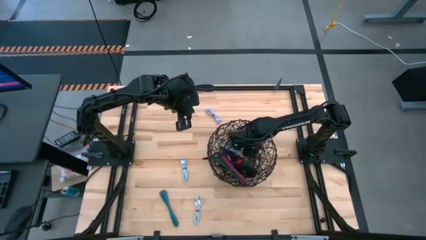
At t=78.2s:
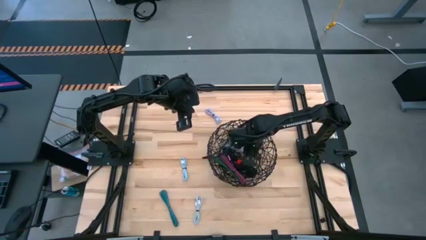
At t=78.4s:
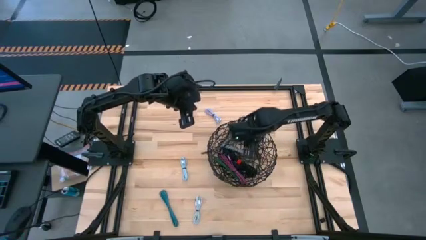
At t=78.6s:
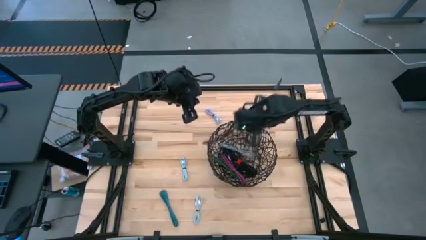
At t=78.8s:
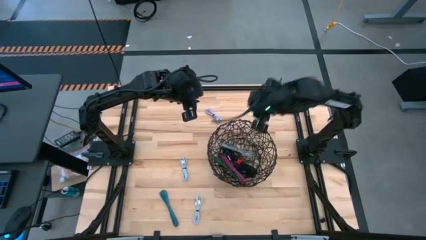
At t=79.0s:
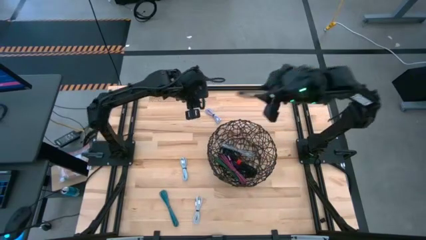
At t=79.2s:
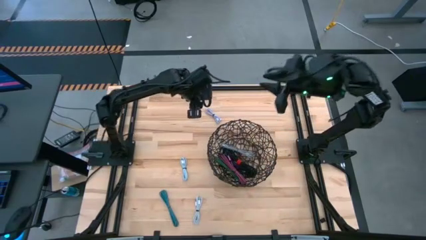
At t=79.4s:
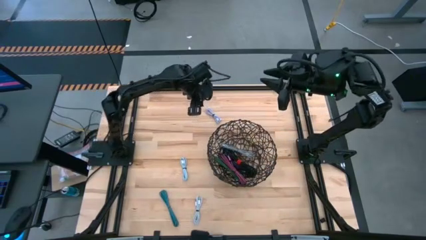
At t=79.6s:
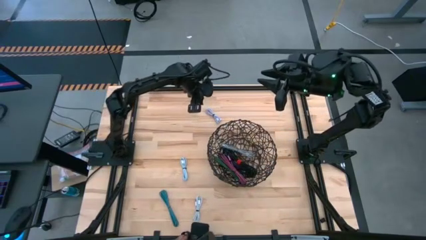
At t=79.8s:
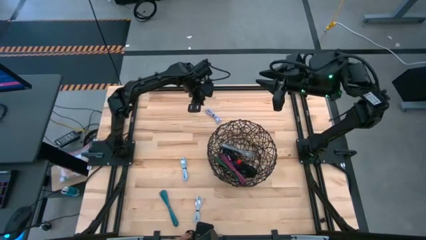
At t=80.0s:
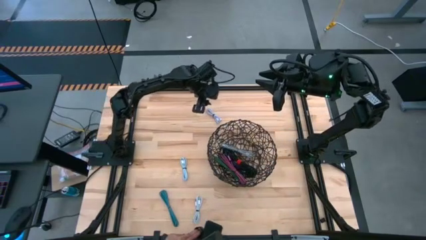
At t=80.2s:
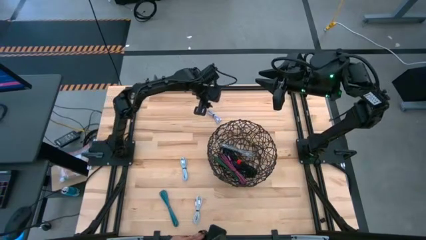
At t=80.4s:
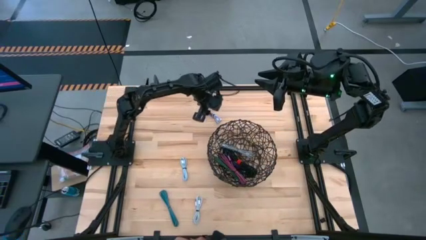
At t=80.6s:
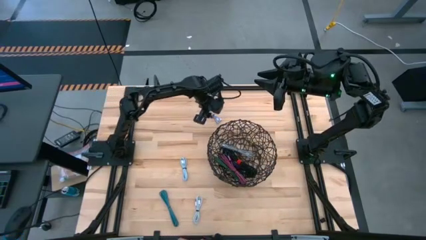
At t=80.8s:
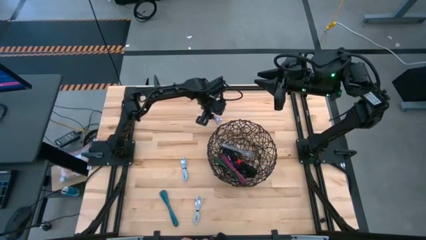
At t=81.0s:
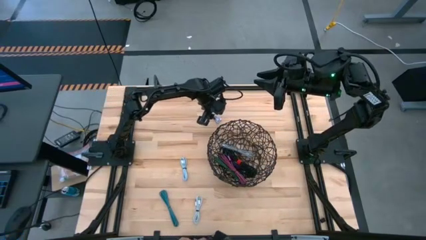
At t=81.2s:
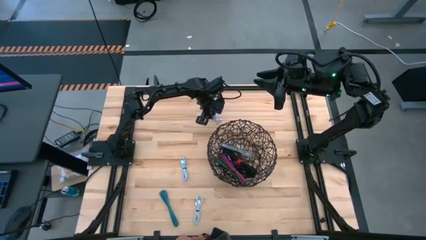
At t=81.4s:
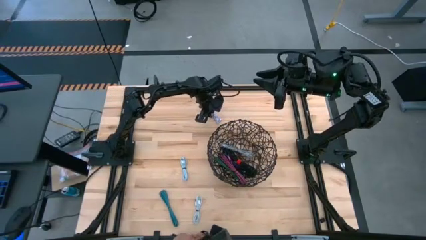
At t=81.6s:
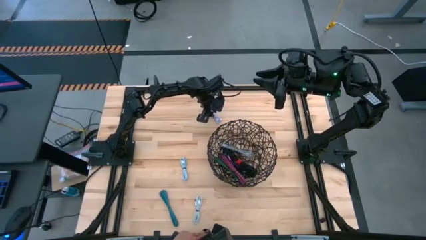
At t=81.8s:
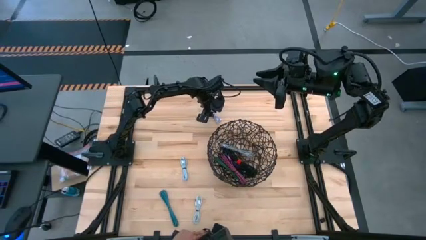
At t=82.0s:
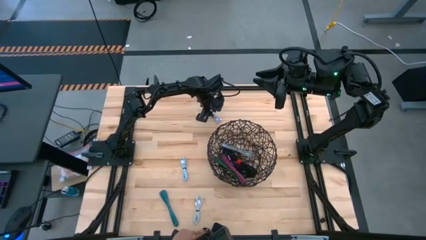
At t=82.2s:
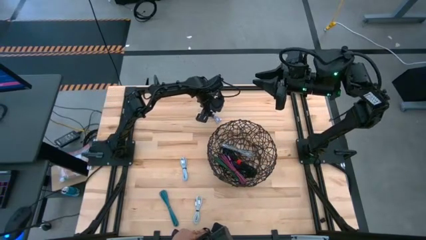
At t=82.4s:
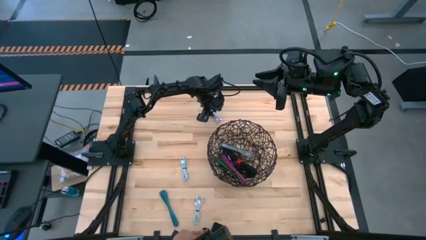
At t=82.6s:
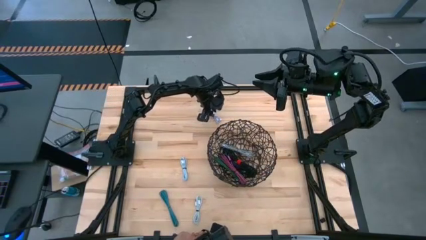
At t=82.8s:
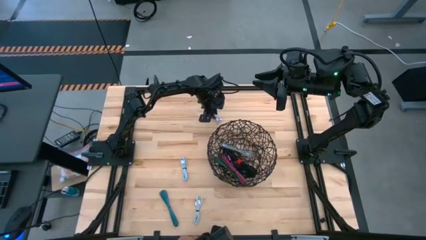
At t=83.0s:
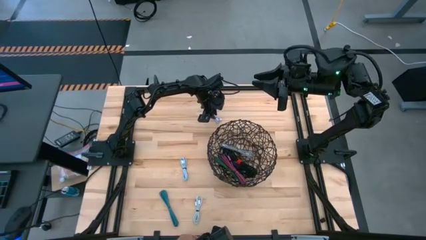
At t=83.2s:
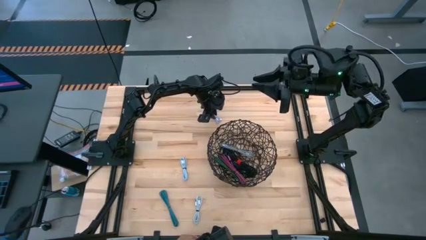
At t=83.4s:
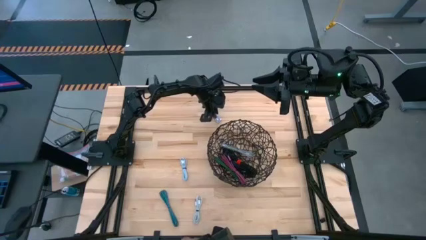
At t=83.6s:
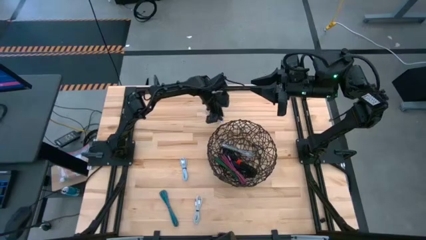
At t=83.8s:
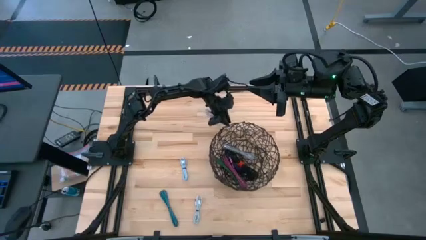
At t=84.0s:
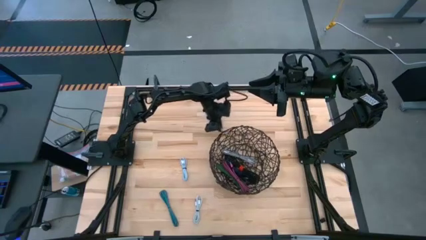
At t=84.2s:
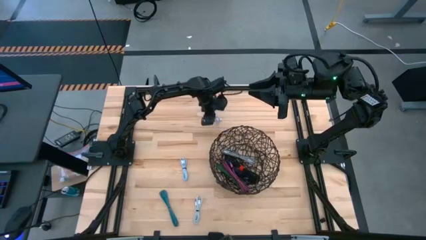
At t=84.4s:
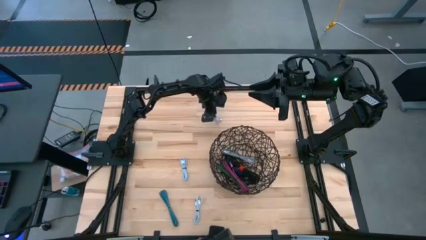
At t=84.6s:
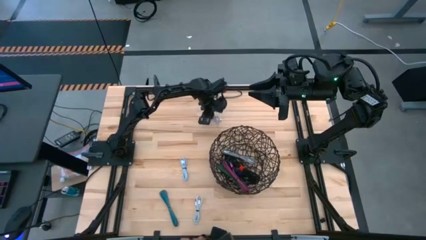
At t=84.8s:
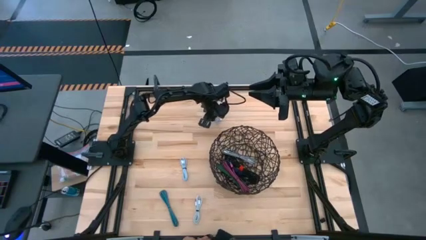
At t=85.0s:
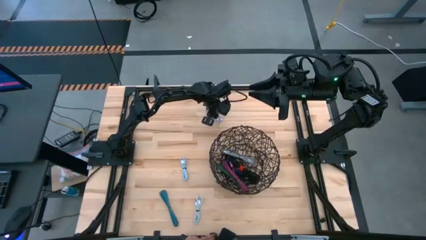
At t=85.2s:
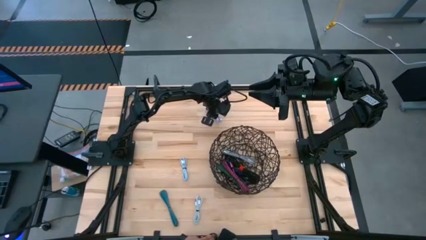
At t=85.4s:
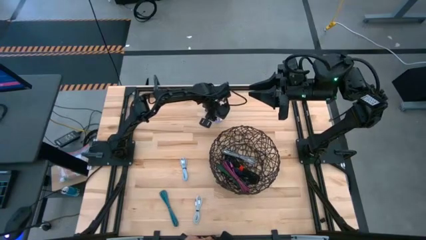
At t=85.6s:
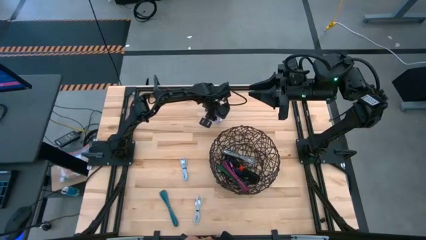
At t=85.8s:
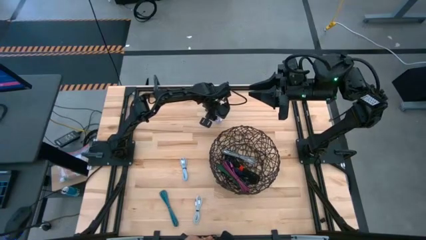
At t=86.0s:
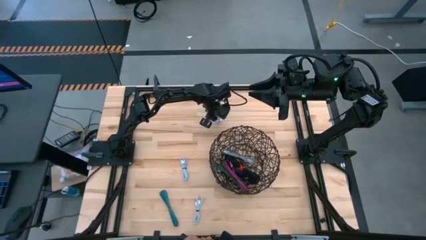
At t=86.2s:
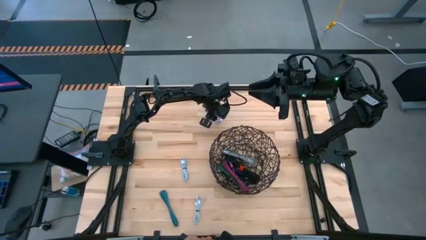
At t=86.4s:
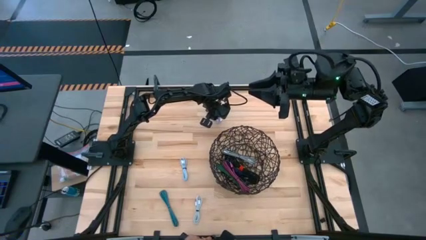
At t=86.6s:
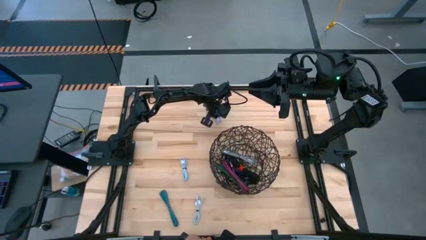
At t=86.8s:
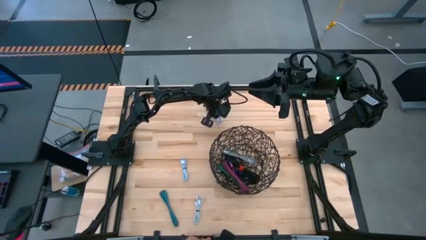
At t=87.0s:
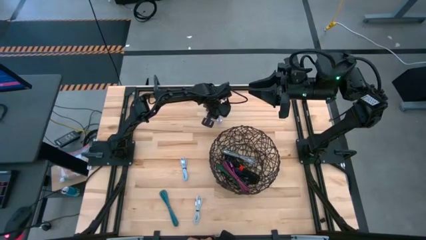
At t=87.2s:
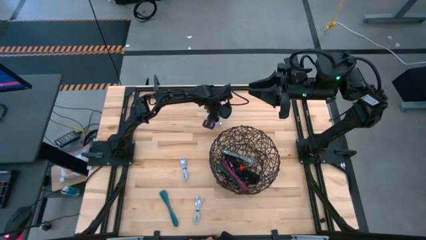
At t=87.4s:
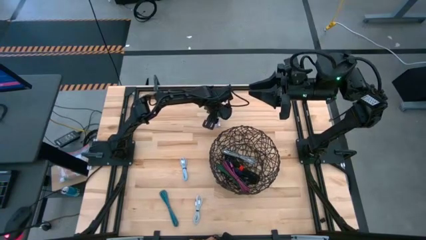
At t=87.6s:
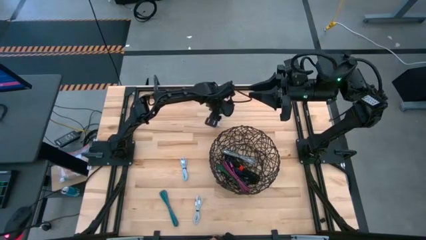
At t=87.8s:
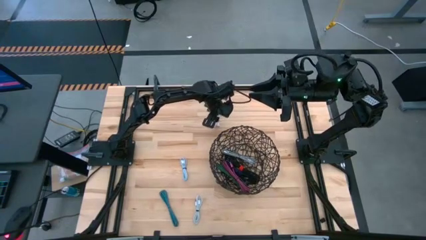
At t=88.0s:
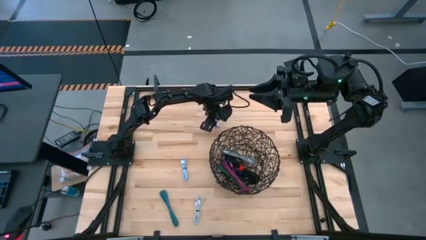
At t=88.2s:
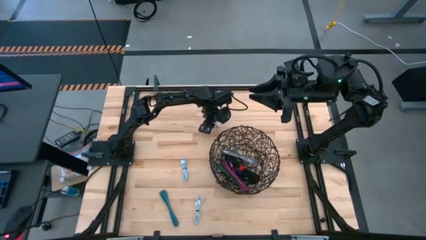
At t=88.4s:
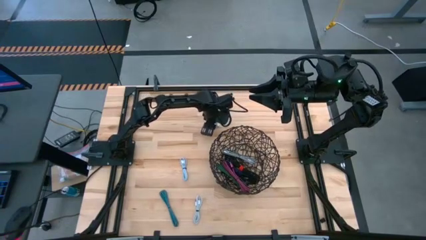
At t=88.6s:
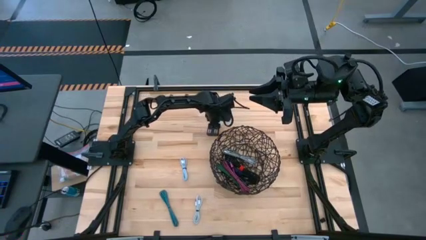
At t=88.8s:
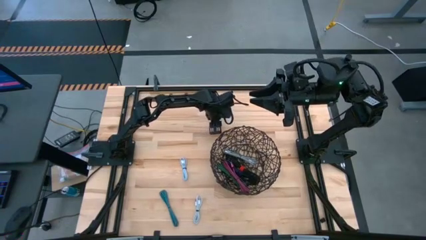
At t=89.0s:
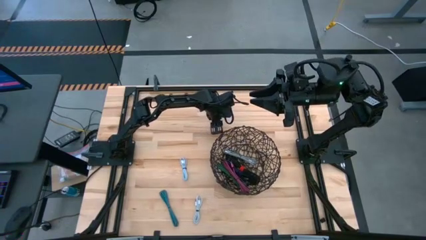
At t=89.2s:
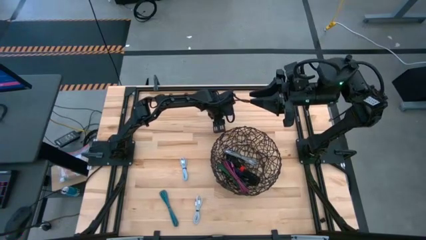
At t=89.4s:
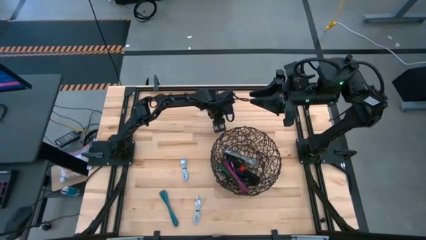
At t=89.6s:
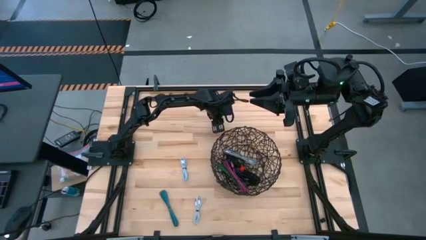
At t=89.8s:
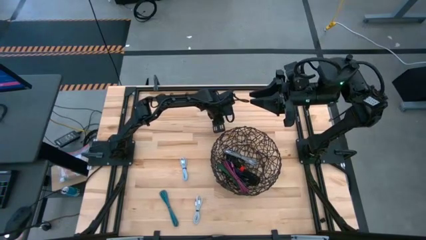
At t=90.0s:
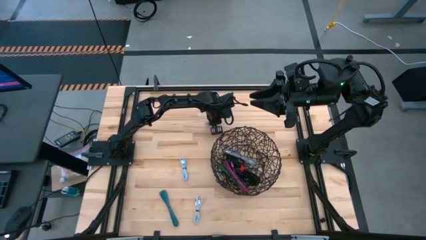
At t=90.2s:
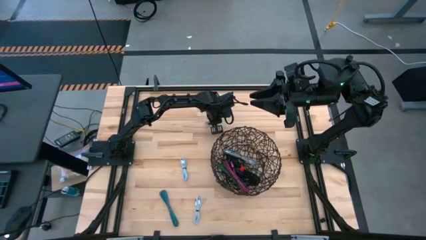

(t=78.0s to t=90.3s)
Task: Pick and place USB-C Cables
Put the purple charger cable into the black wire basket

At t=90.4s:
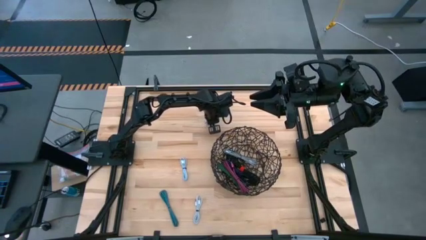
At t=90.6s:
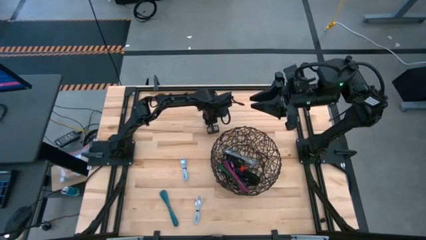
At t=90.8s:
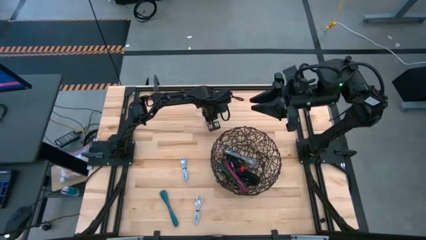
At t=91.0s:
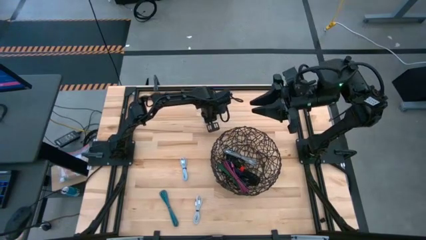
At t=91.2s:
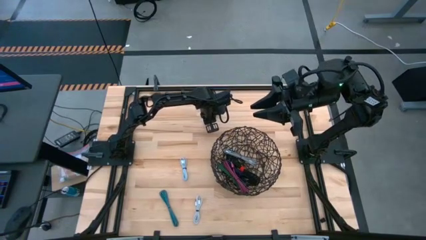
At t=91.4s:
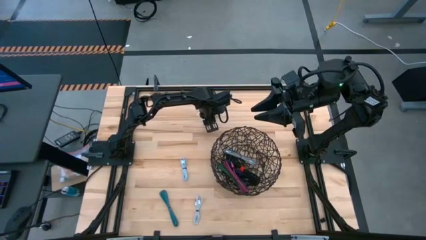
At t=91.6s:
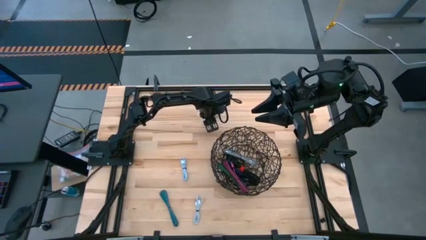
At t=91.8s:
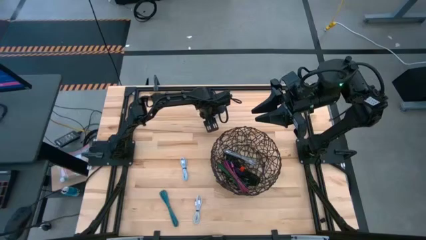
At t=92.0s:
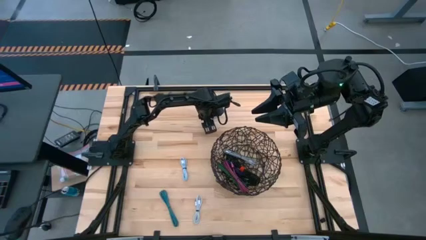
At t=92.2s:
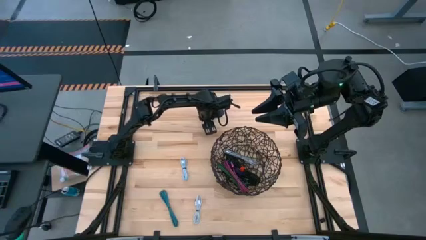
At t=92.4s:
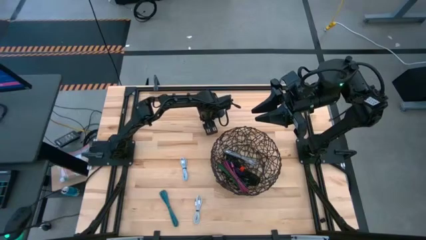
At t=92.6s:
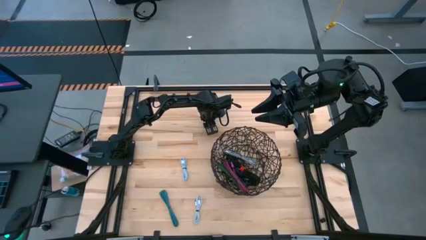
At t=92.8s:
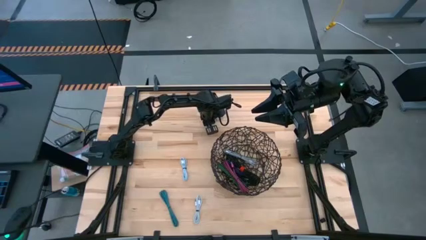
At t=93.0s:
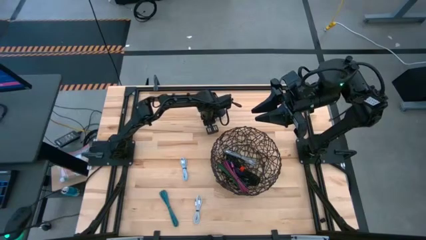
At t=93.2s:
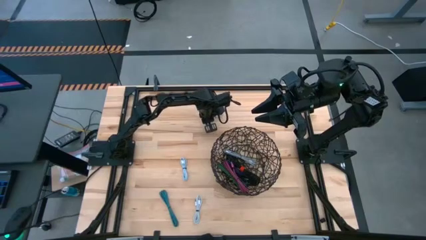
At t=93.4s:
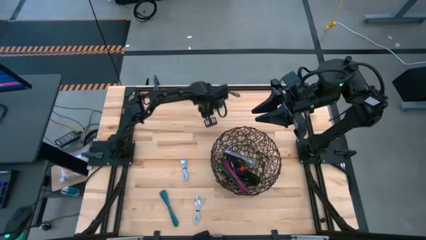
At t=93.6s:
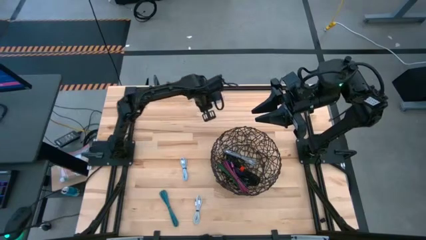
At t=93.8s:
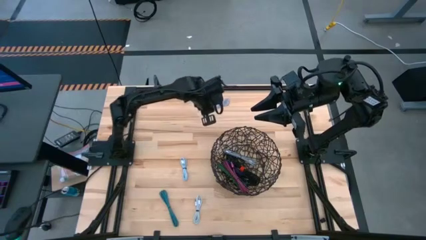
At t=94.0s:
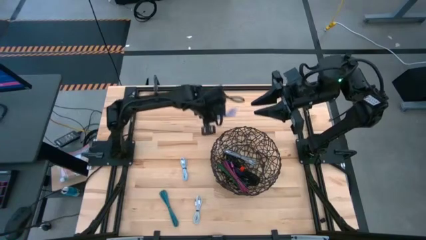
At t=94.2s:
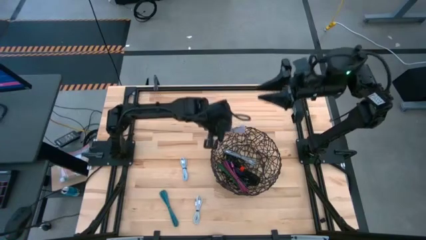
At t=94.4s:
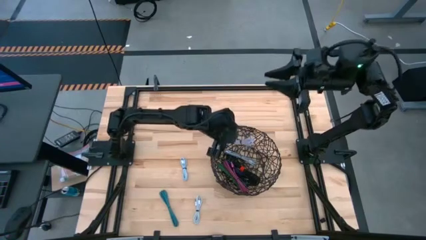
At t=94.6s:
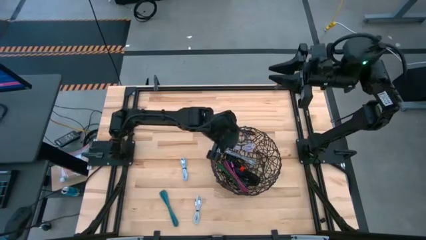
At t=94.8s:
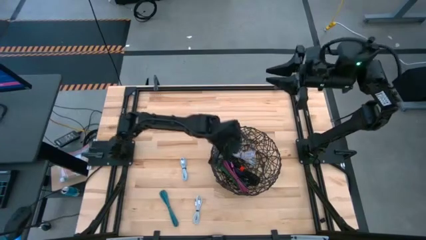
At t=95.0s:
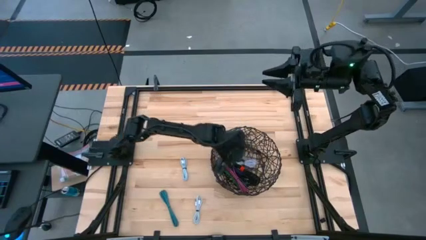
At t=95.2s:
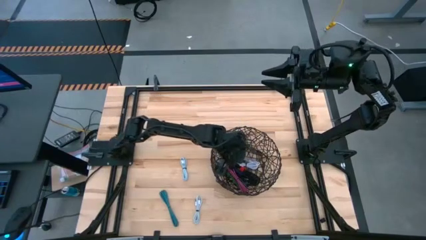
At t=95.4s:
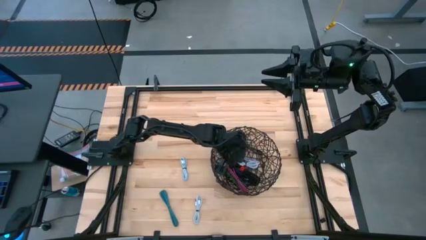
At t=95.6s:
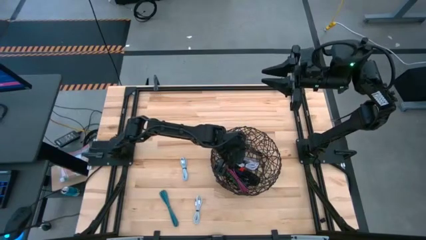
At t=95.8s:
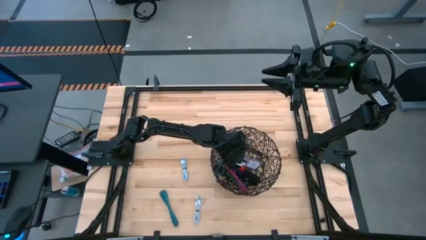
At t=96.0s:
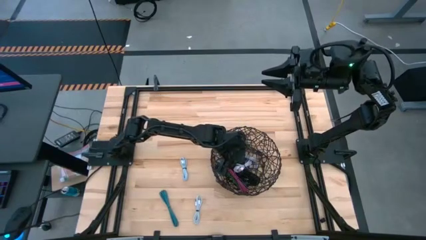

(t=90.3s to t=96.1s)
Put the purple charger cable into the black wire basket
